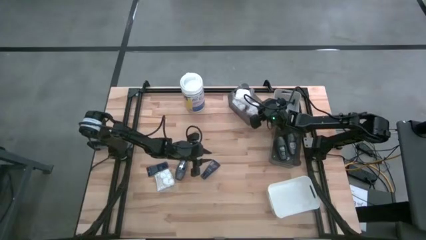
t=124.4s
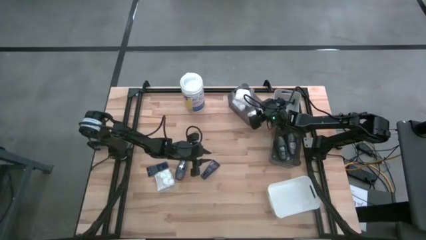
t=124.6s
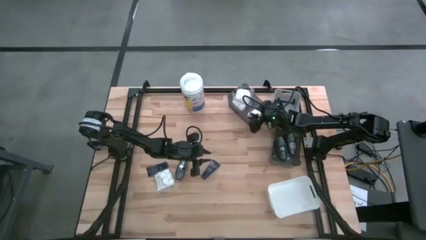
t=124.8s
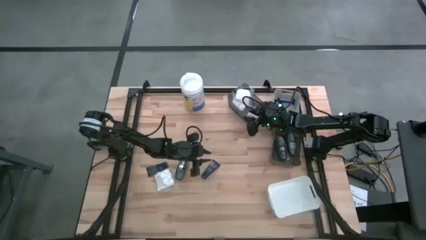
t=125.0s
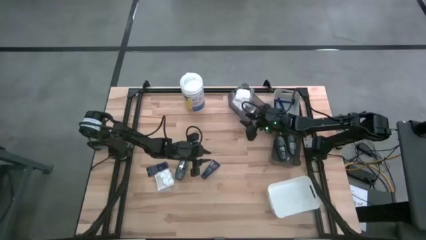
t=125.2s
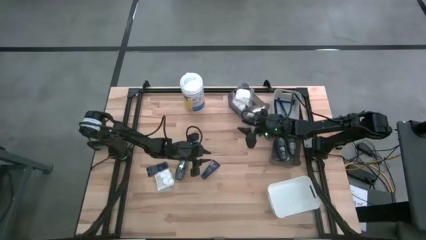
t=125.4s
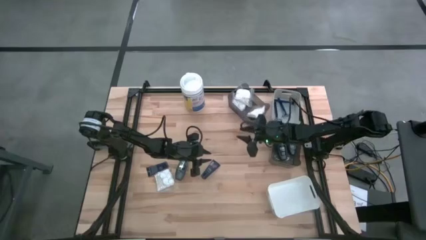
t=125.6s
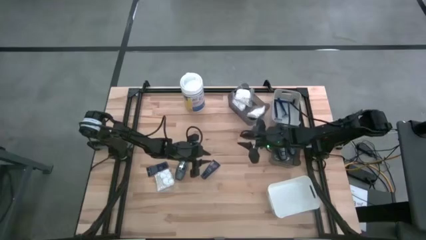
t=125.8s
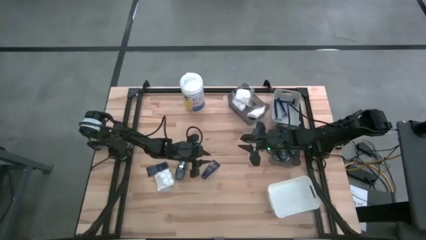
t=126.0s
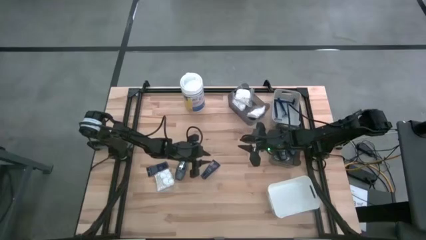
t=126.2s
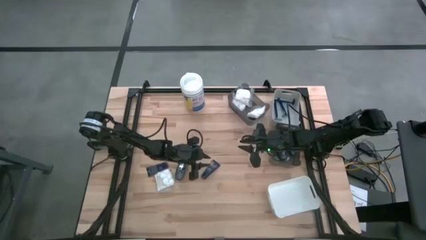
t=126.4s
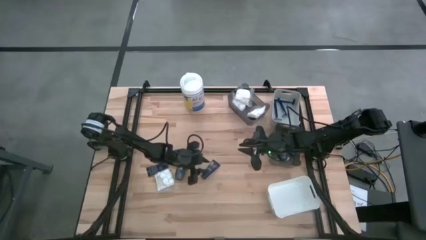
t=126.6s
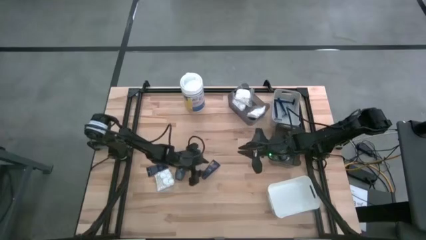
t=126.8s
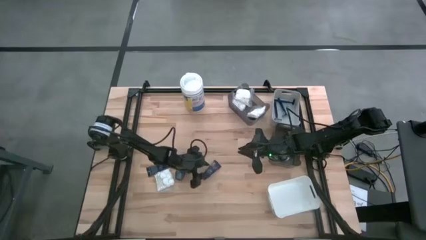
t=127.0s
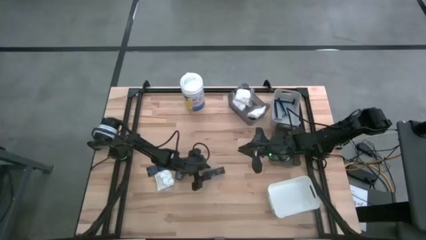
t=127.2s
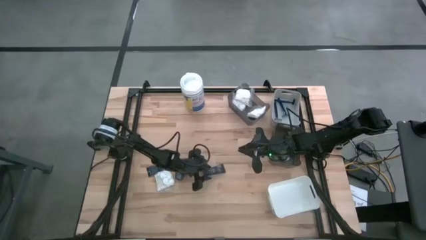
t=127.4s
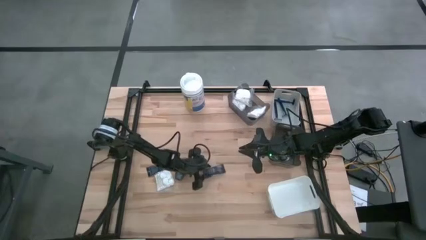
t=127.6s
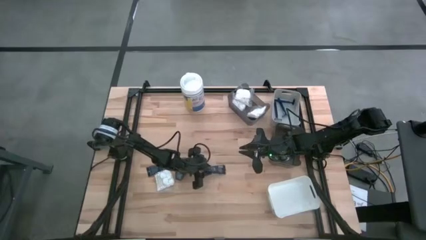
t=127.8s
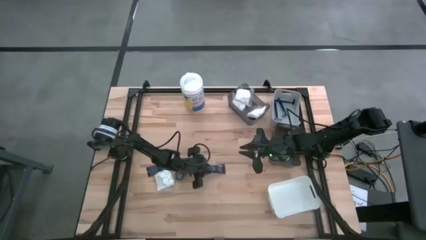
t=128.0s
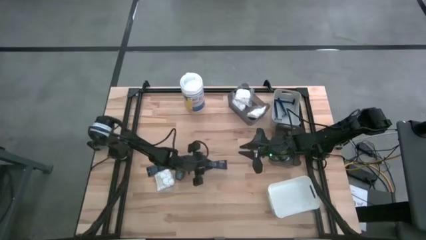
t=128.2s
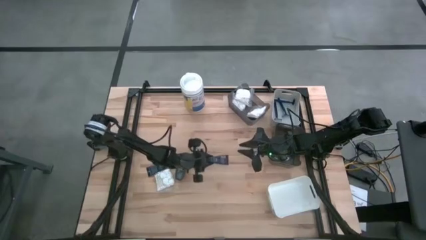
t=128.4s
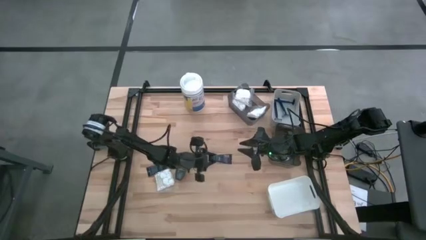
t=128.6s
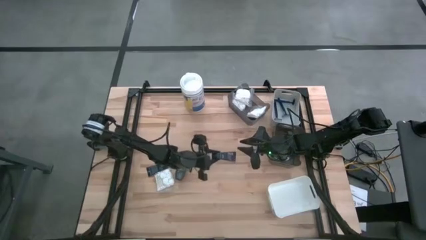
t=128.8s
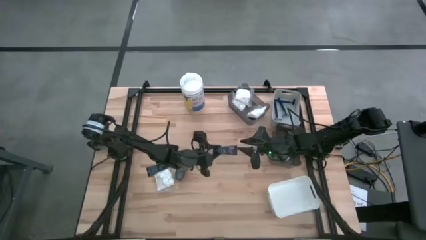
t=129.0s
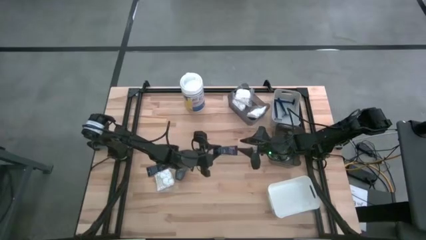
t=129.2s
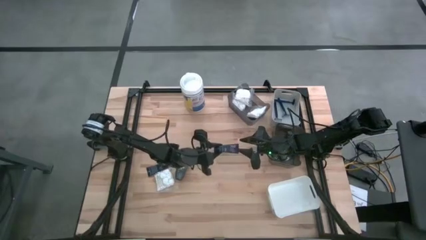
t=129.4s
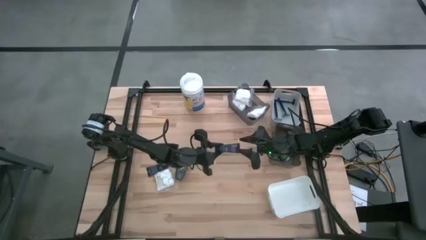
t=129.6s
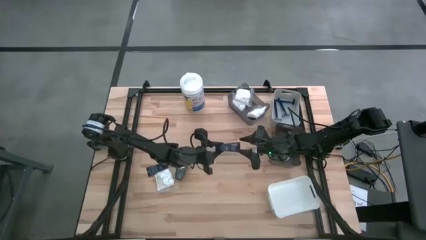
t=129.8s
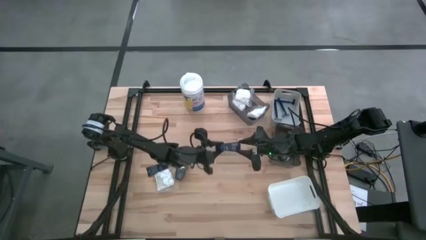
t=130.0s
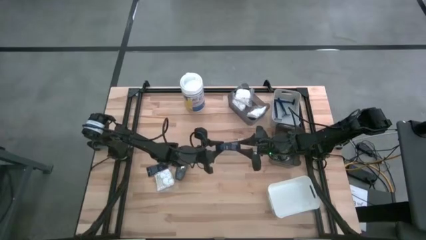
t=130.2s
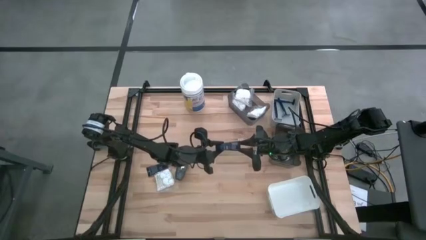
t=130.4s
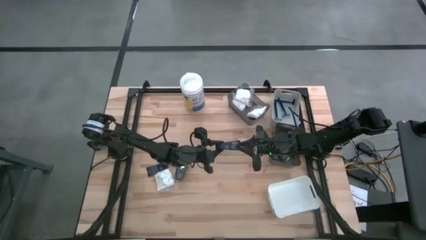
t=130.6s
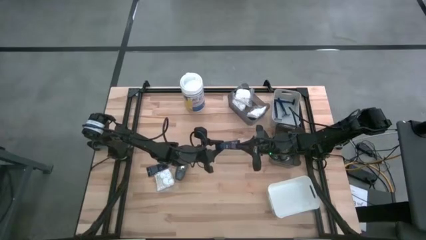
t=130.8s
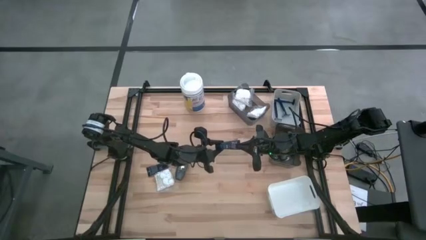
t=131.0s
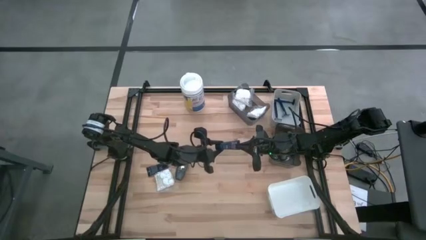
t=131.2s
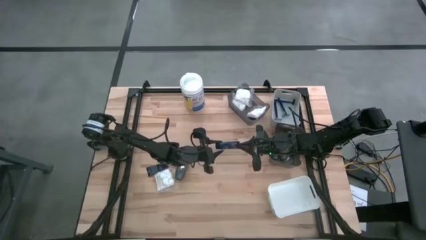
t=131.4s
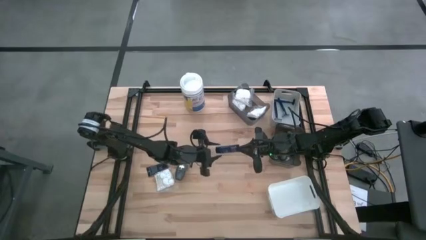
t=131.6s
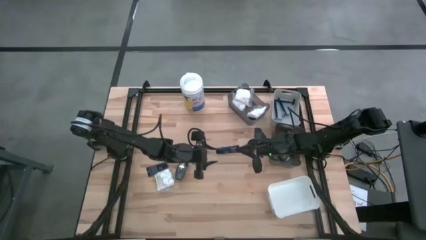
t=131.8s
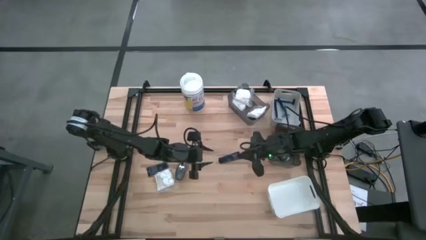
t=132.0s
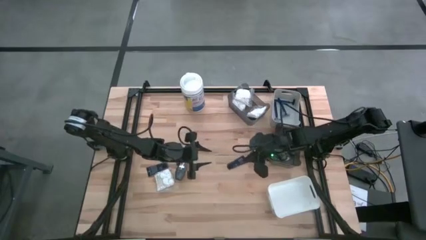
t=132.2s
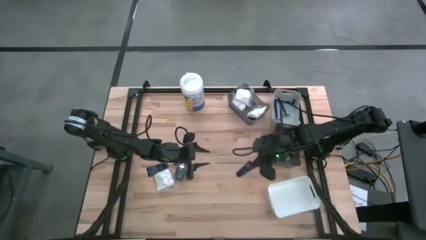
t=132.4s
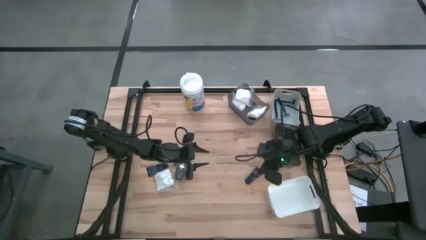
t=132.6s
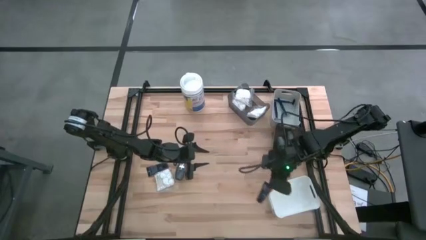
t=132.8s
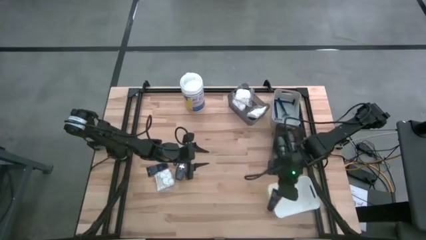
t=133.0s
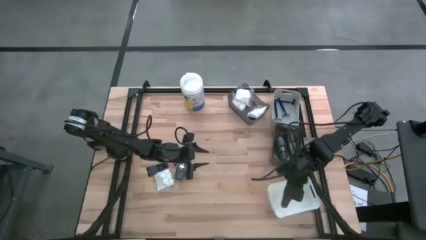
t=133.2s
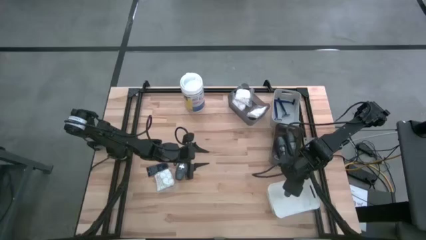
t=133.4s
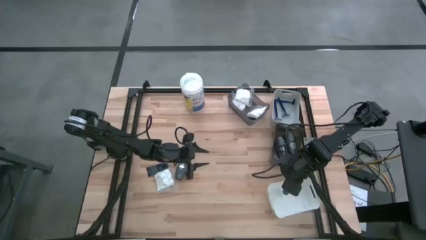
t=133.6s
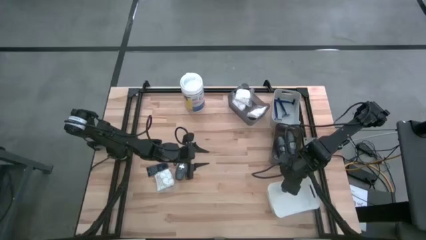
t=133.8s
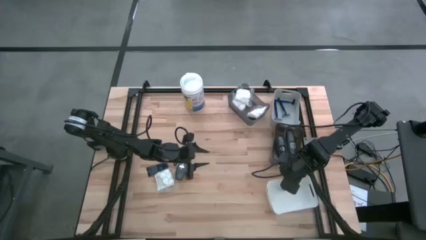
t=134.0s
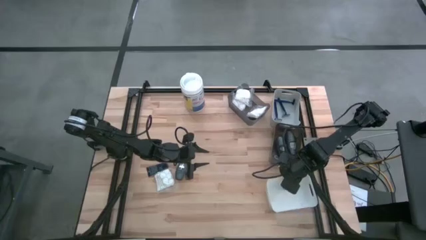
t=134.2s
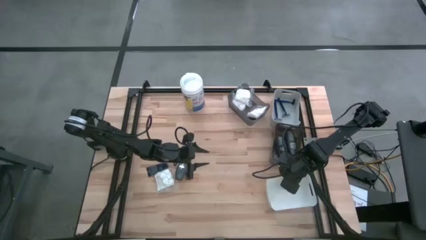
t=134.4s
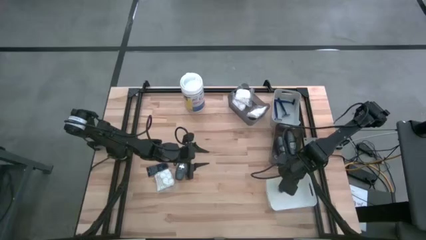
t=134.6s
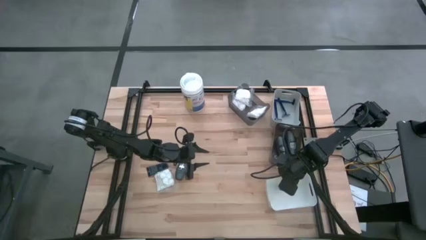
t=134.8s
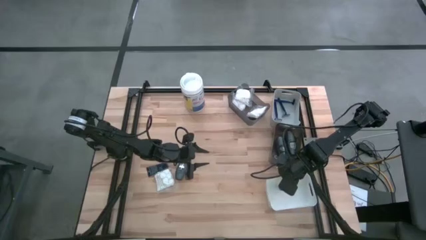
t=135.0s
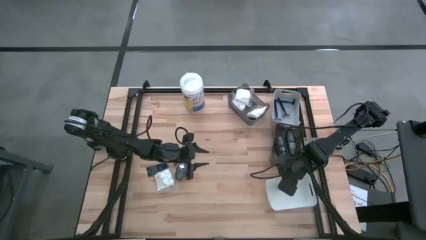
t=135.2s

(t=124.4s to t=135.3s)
Task: Pick & Place Travel size toiletries
Put the right blue shave cream into the white bin

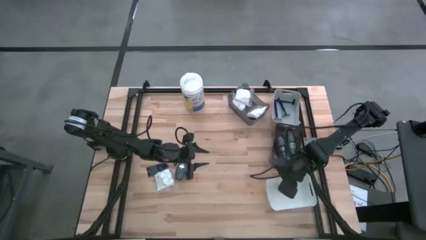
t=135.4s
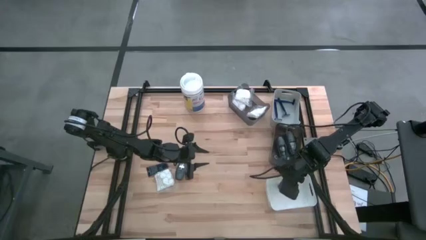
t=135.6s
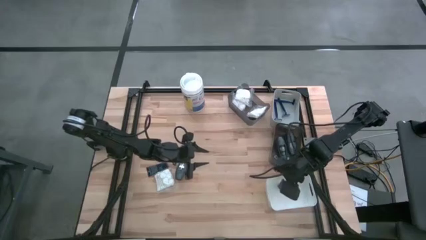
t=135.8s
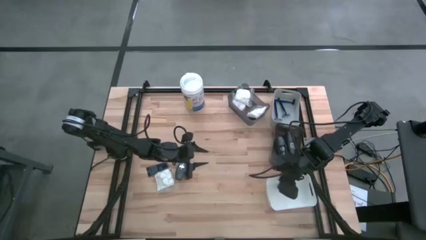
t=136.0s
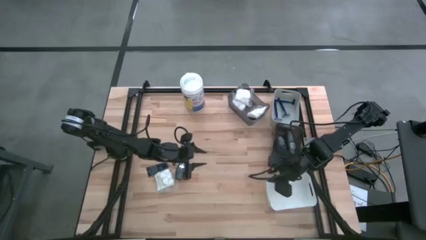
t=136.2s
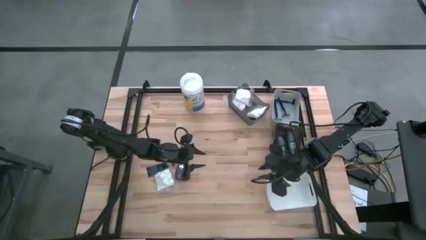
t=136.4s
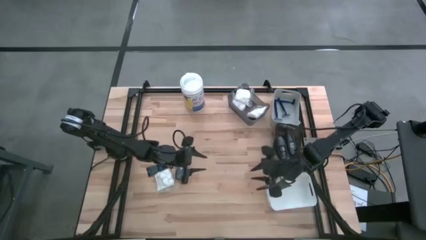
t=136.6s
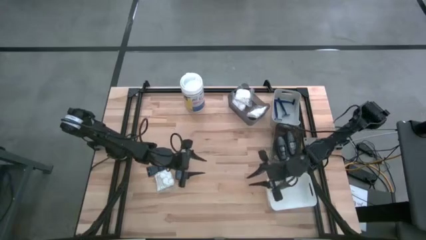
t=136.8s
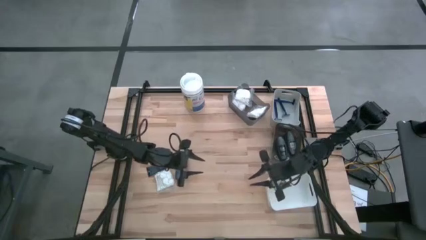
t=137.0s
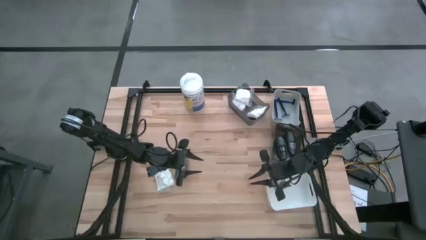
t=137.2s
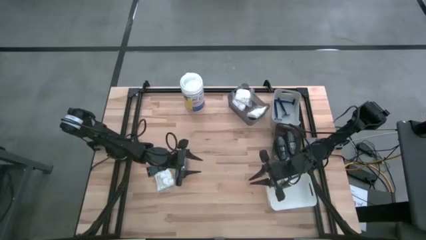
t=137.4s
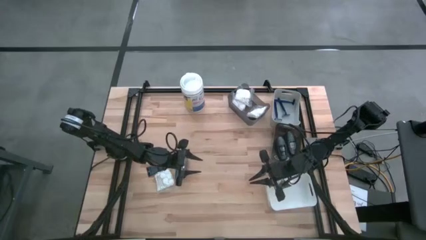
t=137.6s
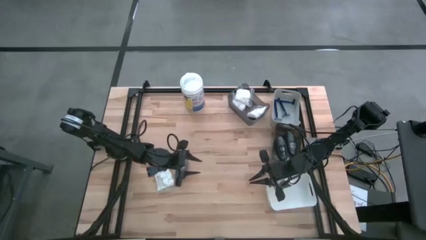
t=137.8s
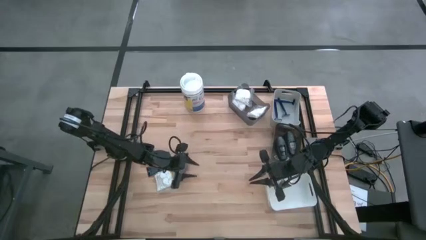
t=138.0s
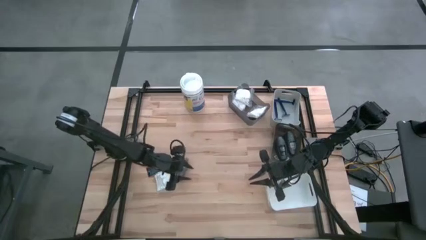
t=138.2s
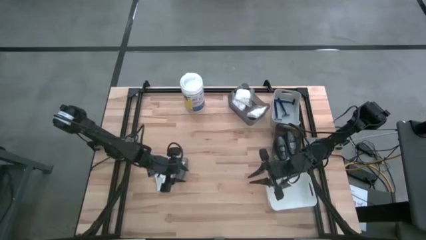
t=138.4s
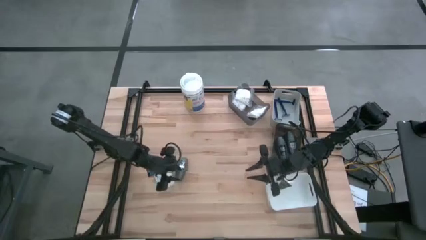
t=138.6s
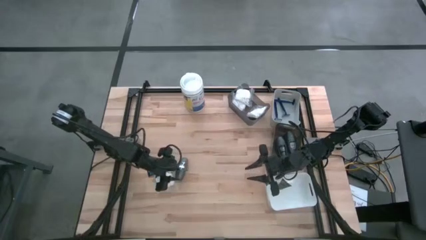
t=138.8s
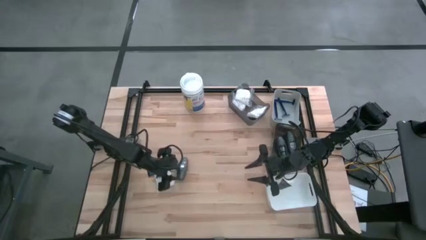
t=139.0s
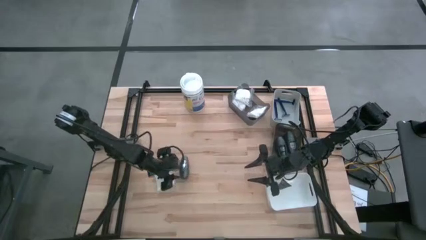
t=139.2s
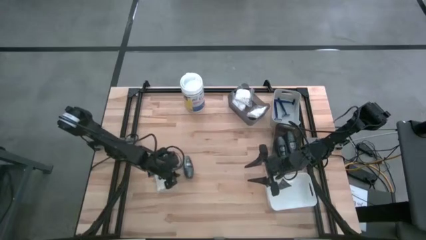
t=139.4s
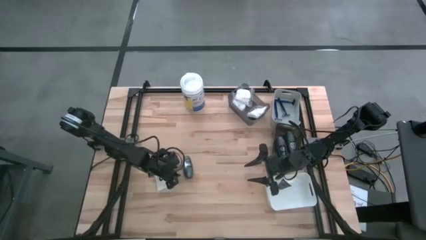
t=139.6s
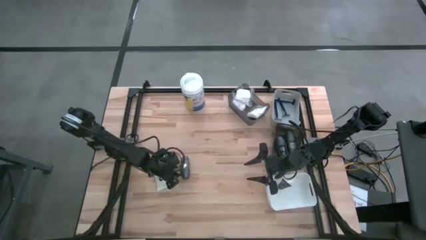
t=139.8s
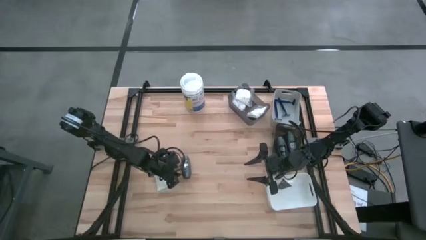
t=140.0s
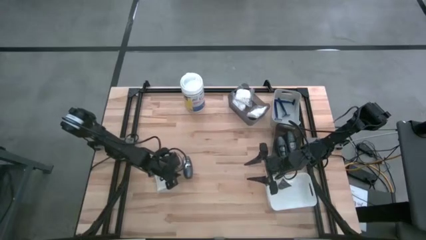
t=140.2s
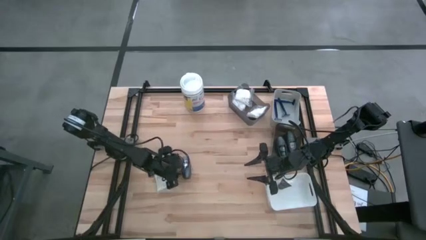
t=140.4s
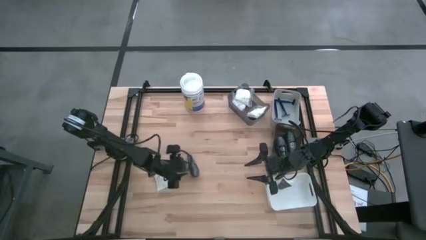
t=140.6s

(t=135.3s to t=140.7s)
Put the gray deodorant into the bottom black bin
